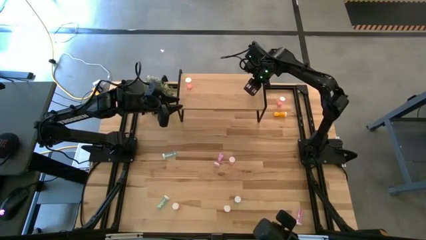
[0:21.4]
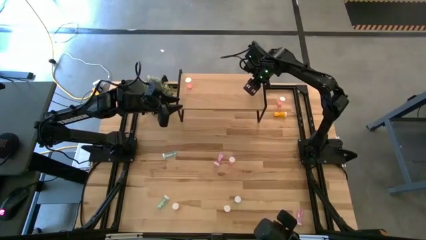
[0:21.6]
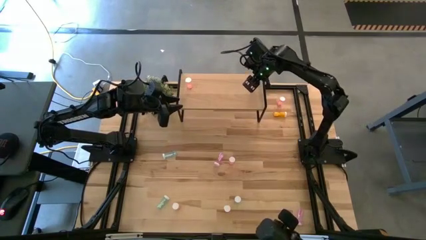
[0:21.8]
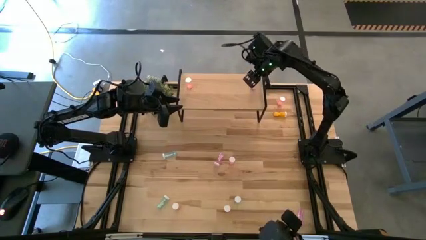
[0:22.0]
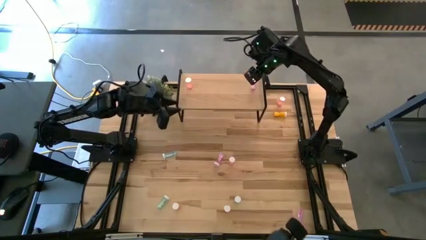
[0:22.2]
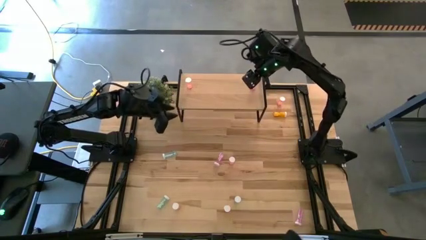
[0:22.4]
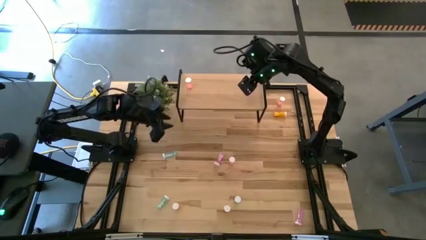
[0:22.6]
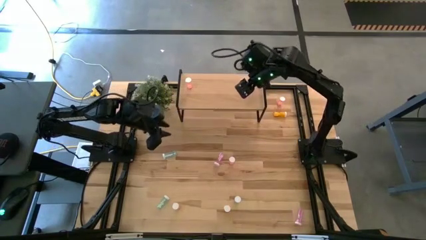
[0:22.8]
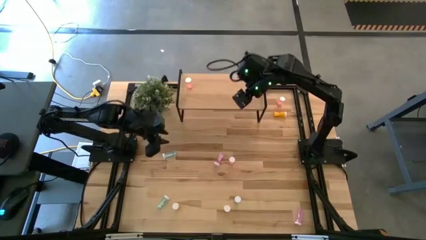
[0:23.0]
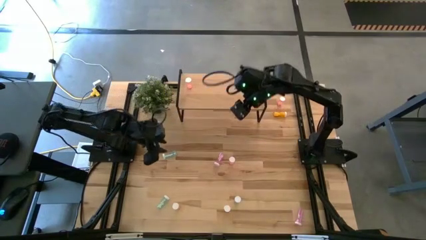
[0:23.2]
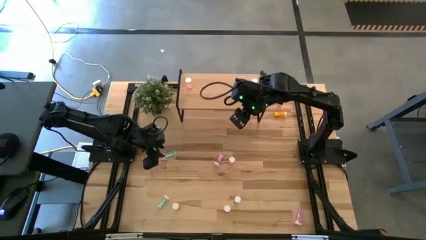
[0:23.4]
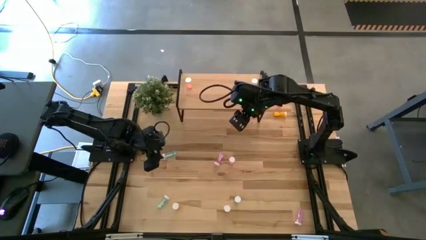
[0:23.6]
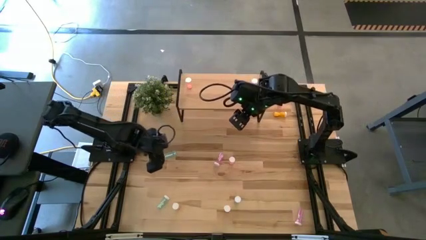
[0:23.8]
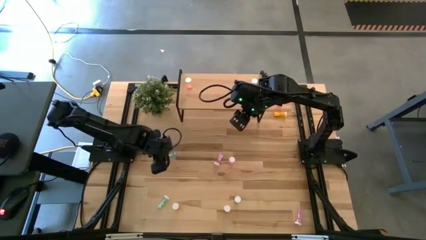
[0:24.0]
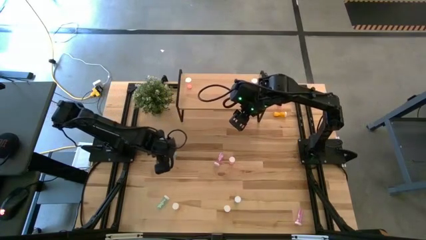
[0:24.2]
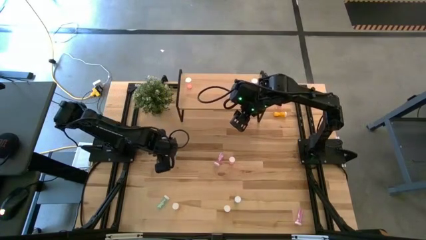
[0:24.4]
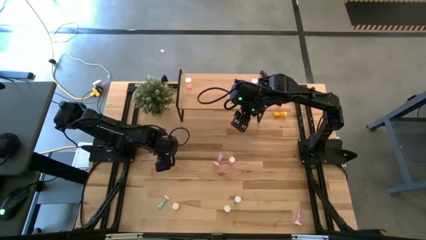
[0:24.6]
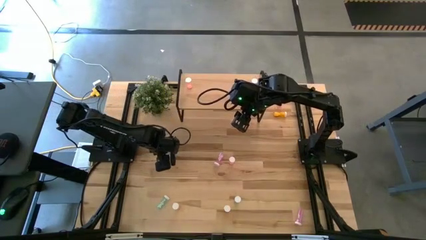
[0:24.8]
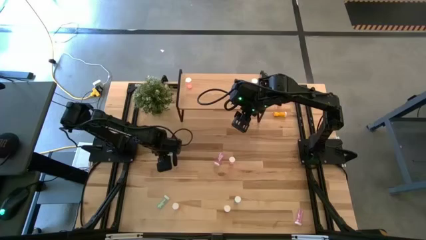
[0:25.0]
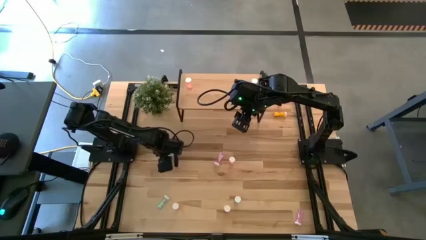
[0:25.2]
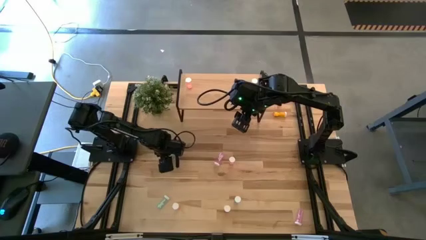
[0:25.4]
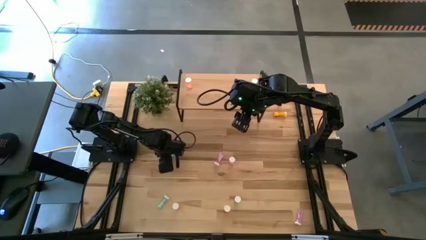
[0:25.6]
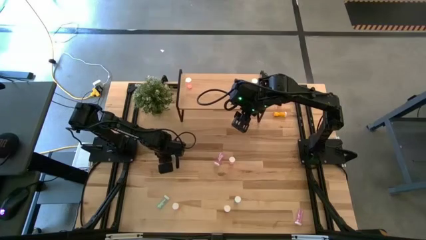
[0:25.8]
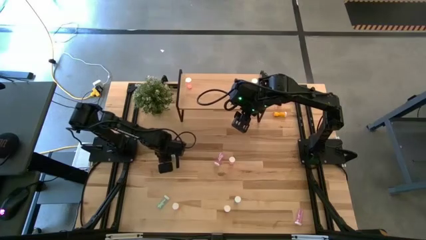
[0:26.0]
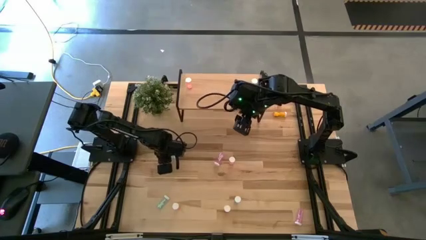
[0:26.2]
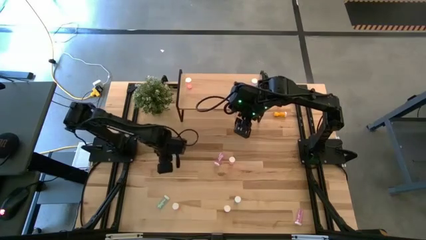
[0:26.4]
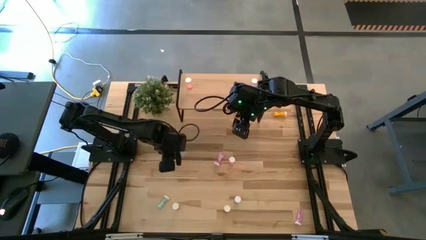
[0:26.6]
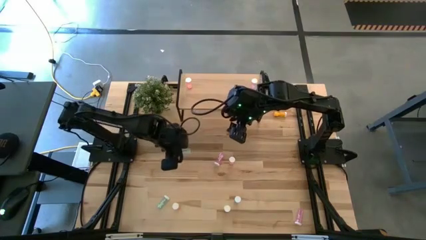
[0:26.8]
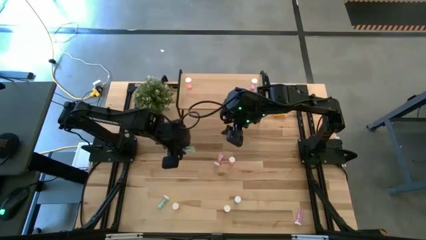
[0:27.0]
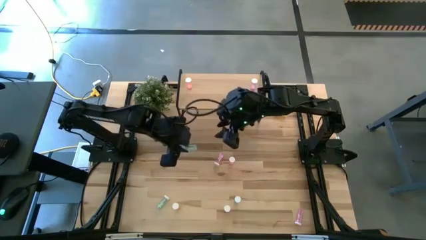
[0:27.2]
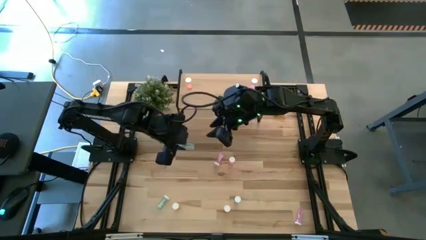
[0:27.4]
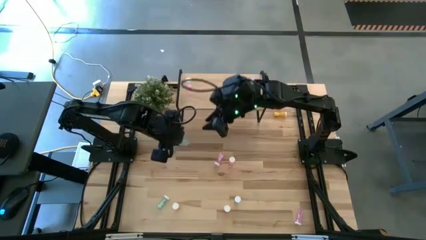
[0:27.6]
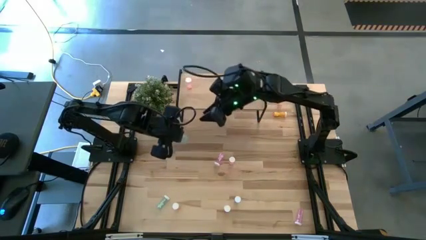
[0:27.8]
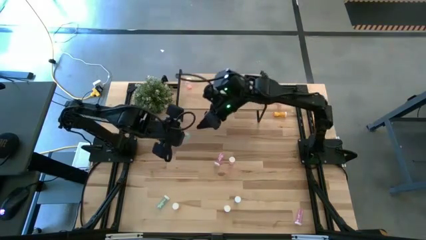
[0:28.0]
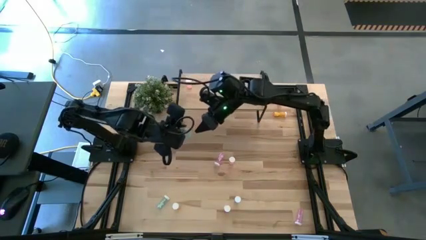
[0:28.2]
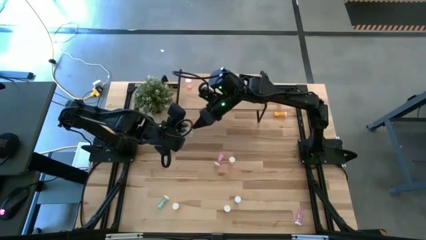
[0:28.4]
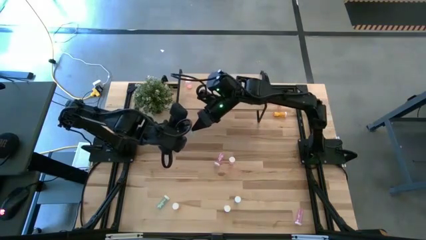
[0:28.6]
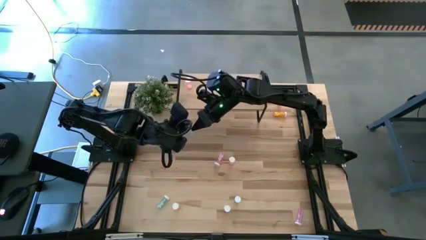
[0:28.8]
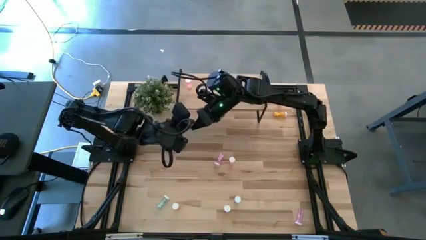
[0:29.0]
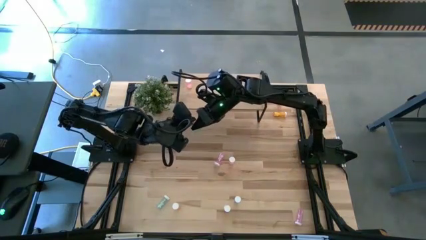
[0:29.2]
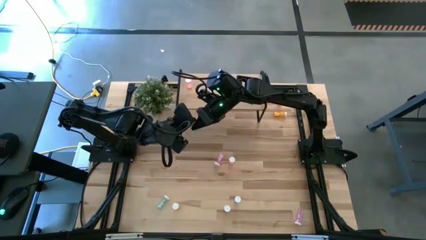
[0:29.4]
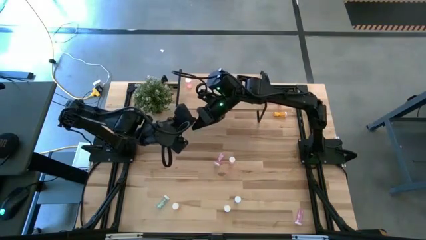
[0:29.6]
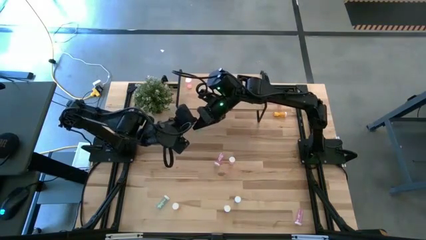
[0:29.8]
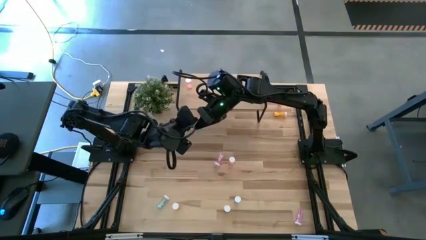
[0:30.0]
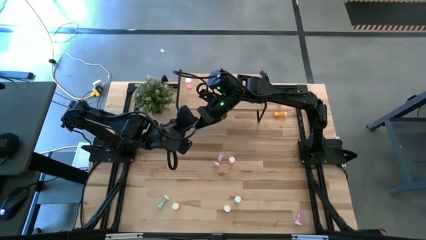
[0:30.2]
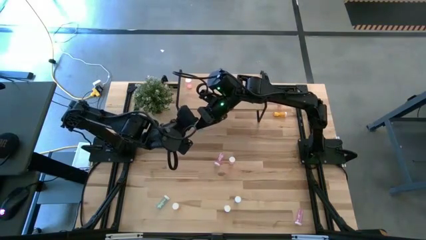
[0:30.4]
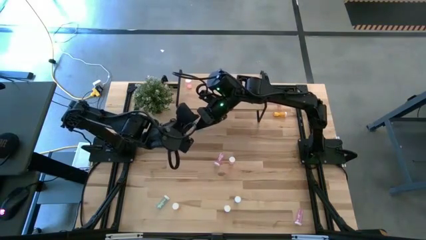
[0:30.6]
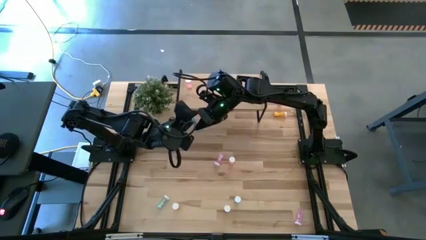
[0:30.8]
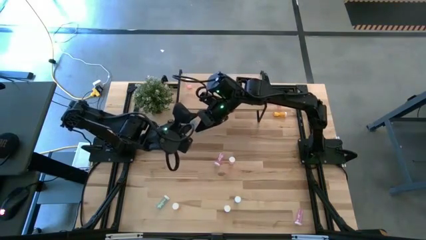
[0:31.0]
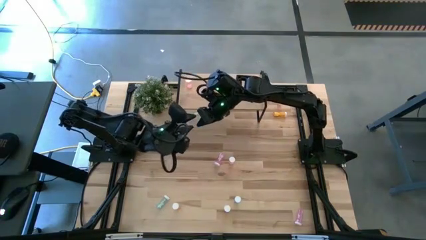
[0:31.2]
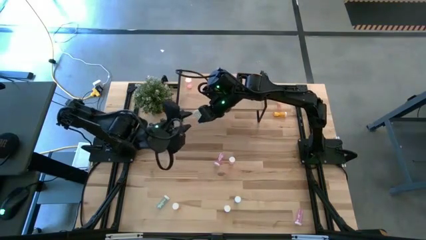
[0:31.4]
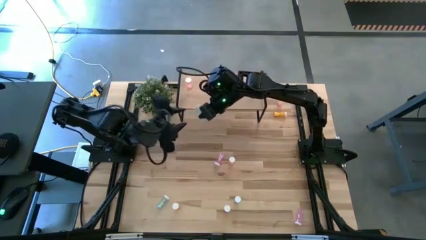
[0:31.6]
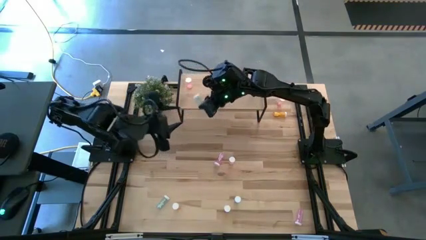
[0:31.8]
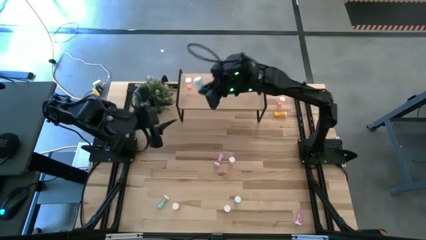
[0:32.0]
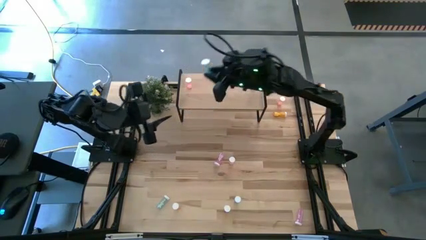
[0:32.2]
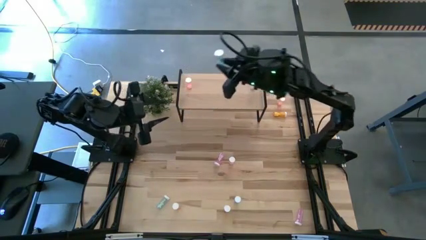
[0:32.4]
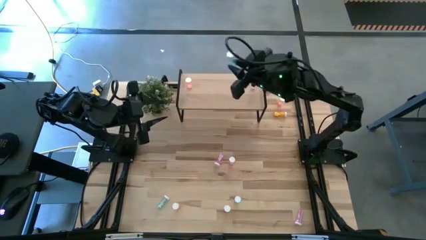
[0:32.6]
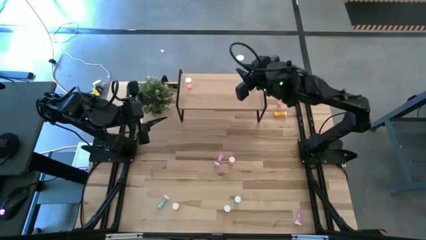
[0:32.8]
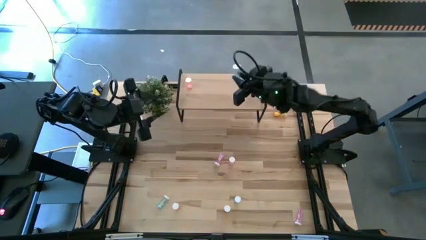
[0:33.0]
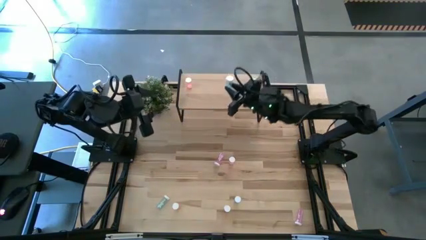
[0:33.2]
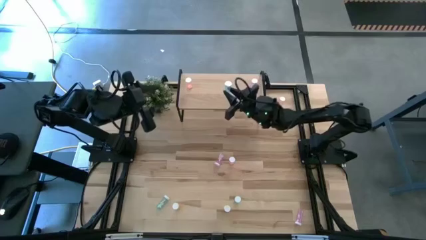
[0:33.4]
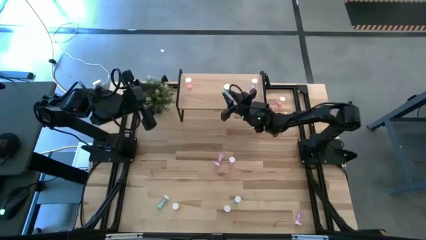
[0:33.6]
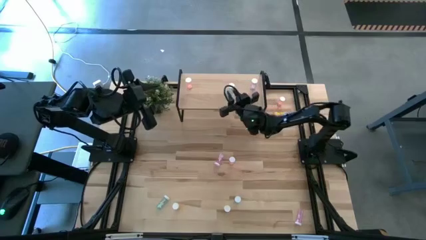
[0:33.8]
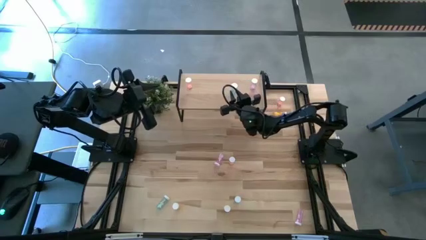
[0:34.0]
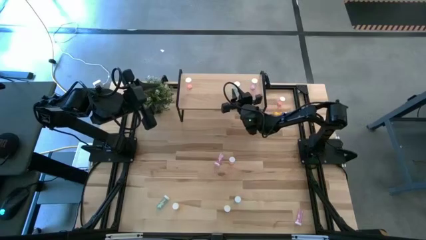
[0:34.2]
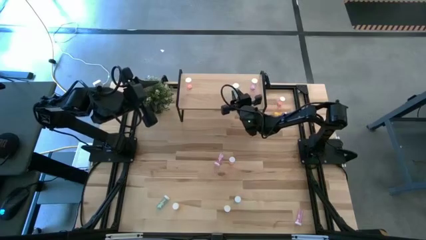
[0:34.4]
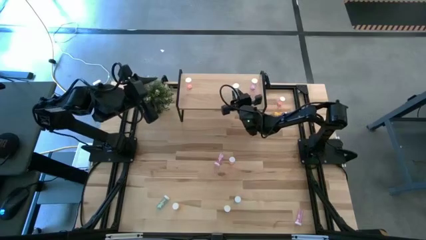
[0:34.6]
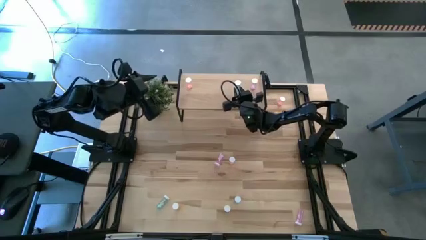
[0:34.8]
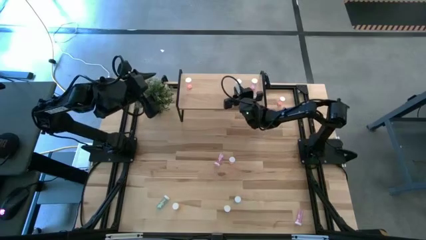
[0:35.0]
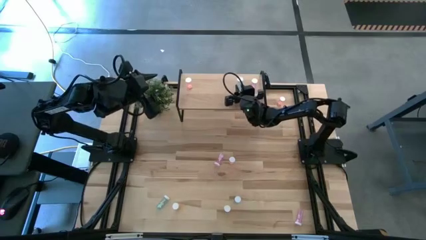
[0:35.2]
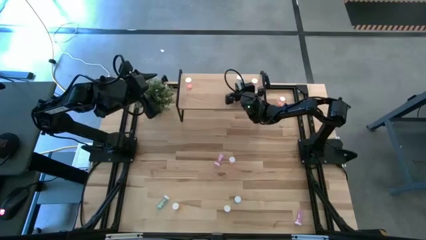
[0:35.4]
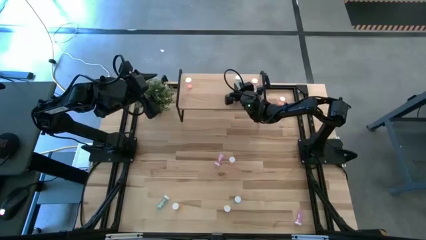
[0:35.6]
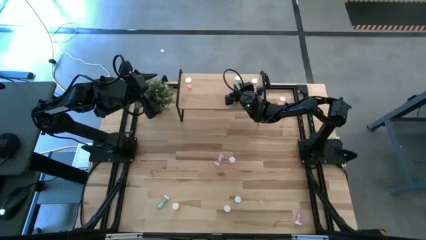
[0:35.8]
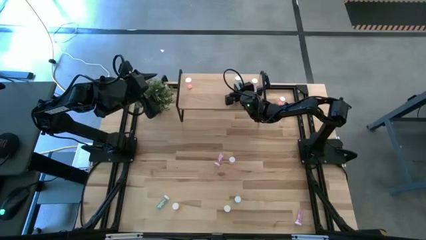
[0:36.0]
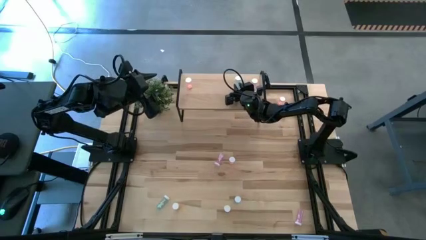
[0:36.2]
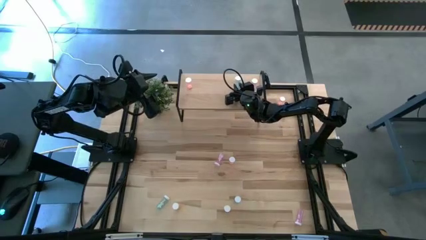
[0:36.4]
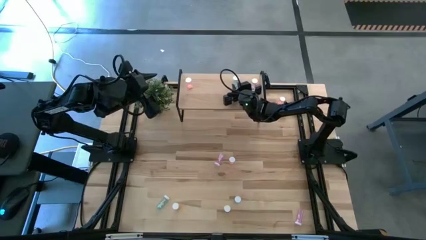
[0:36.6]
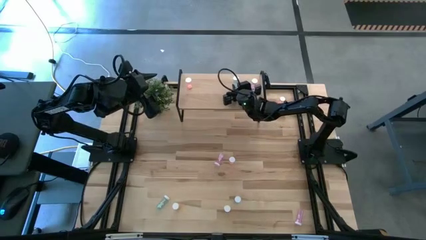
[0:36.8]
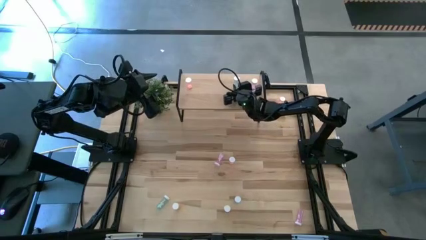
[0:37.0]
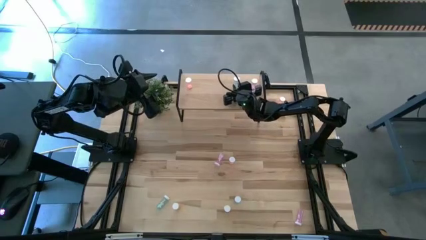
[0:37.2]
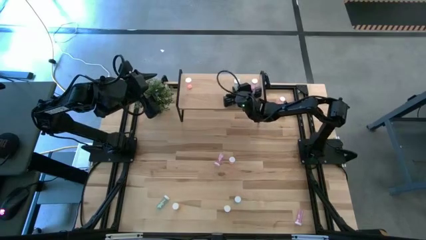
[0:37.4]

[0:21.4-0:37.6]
Task: Pick and place medicine bottles onto shelf by color
Put the top left blue pill bottle on the shelf
